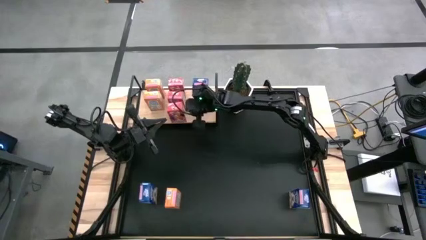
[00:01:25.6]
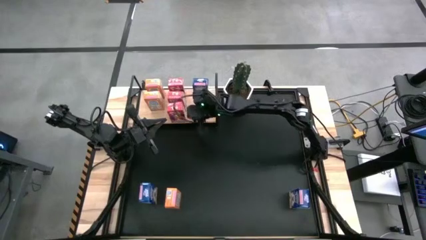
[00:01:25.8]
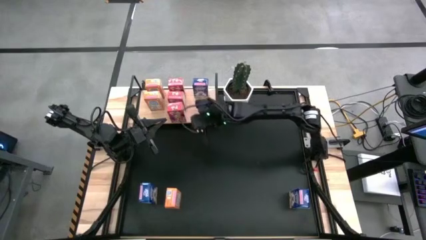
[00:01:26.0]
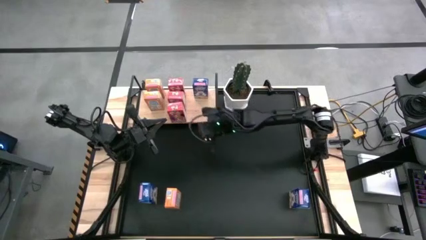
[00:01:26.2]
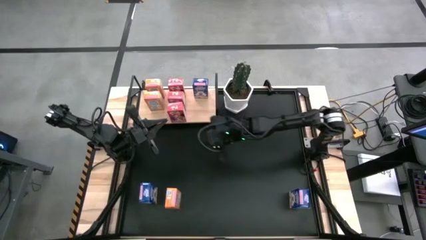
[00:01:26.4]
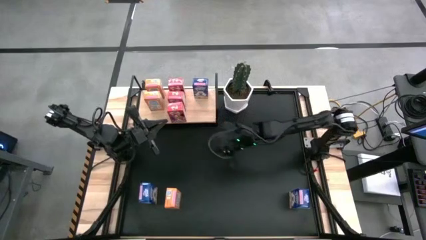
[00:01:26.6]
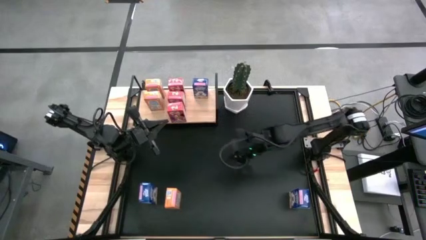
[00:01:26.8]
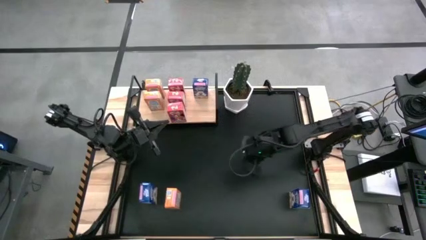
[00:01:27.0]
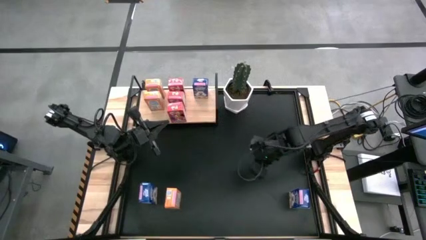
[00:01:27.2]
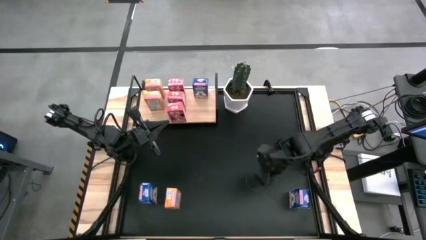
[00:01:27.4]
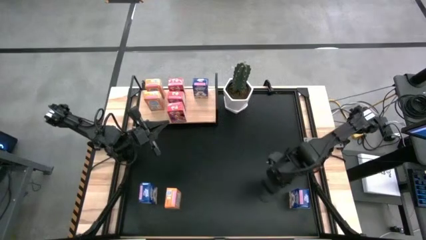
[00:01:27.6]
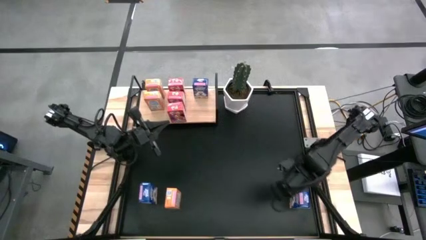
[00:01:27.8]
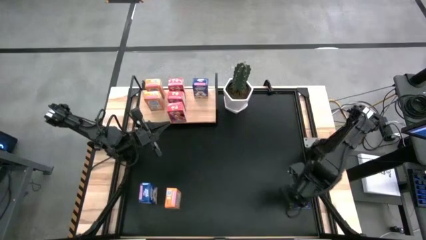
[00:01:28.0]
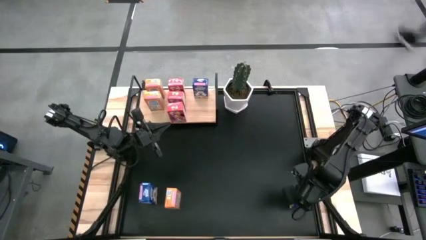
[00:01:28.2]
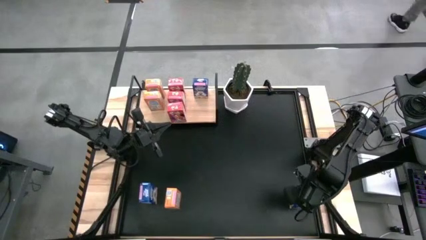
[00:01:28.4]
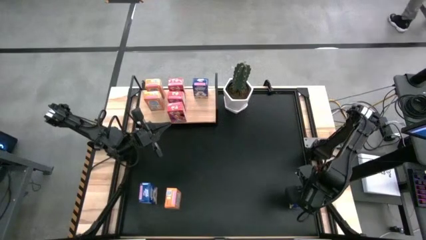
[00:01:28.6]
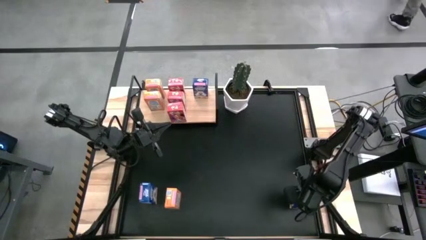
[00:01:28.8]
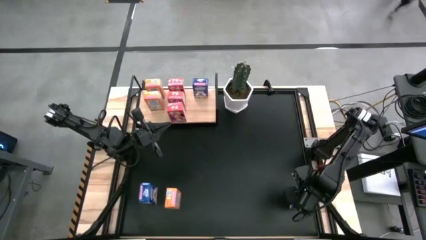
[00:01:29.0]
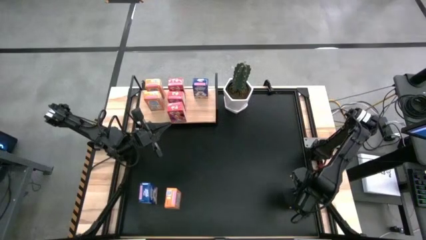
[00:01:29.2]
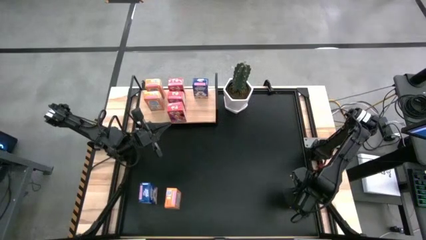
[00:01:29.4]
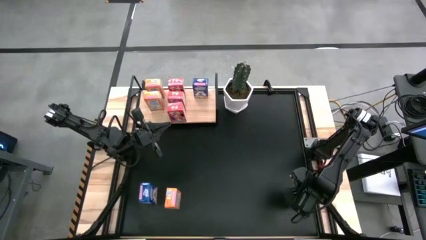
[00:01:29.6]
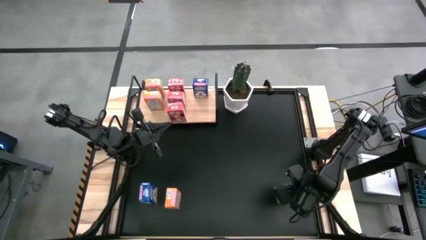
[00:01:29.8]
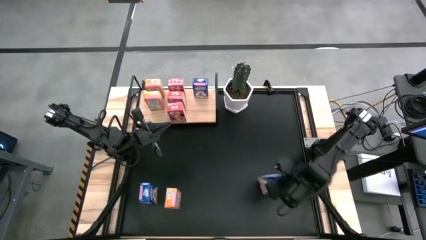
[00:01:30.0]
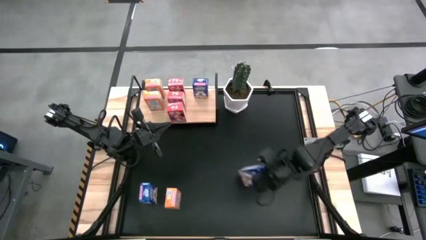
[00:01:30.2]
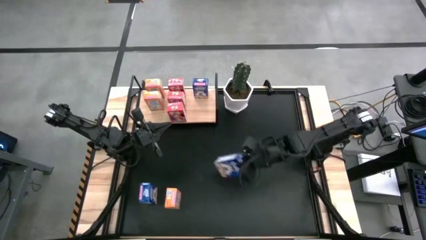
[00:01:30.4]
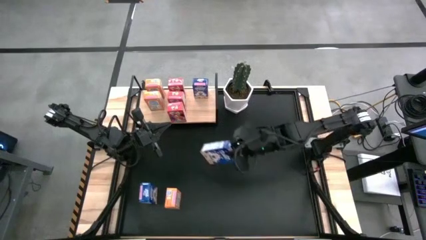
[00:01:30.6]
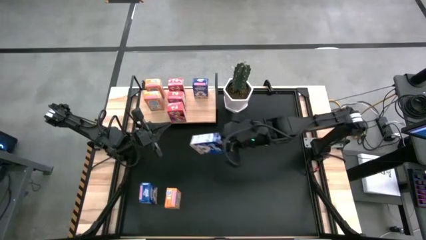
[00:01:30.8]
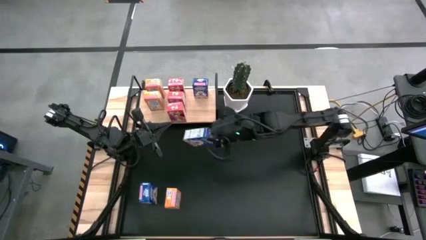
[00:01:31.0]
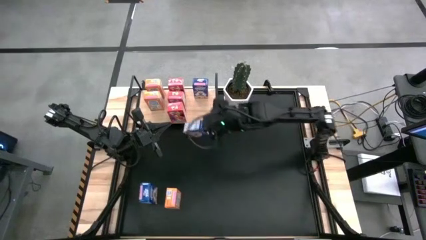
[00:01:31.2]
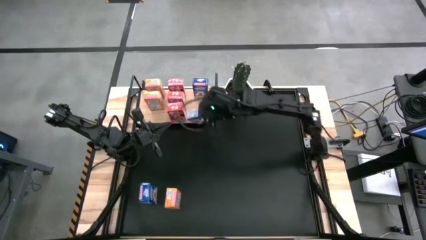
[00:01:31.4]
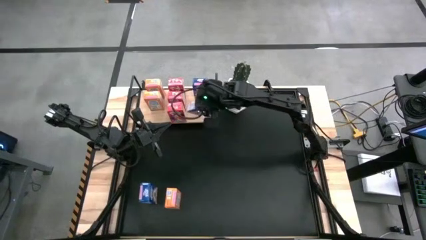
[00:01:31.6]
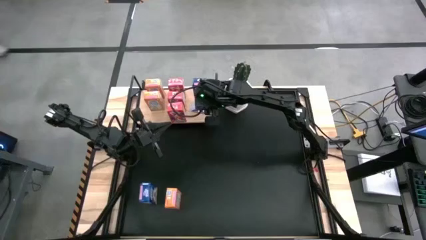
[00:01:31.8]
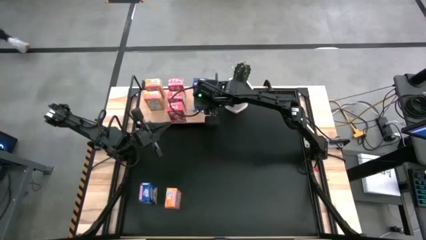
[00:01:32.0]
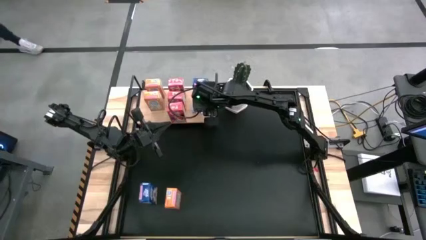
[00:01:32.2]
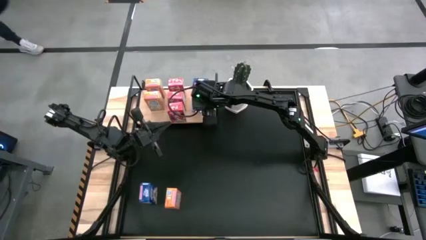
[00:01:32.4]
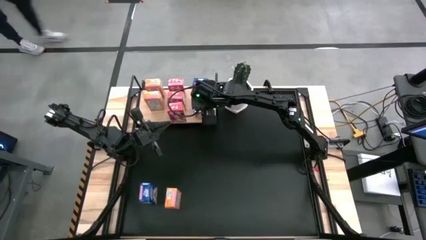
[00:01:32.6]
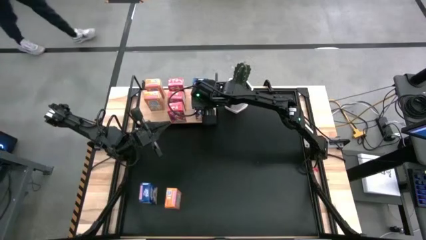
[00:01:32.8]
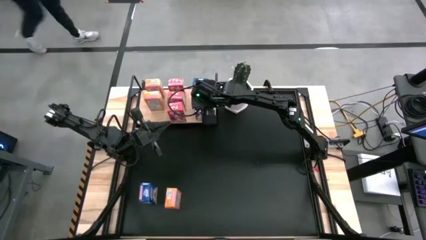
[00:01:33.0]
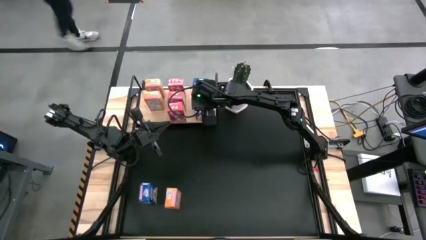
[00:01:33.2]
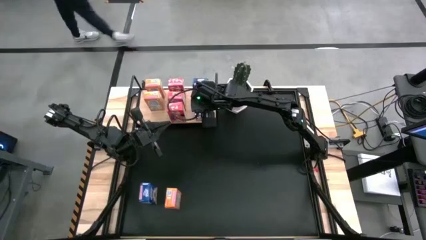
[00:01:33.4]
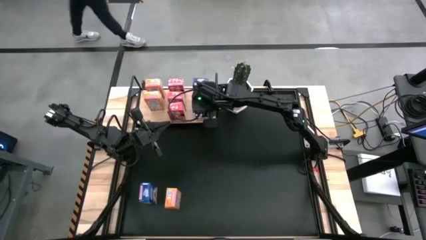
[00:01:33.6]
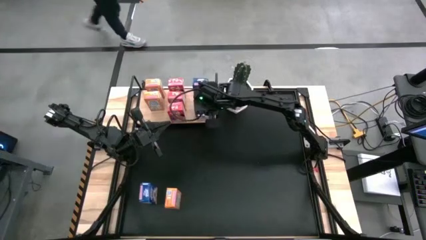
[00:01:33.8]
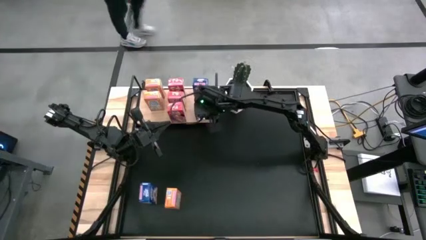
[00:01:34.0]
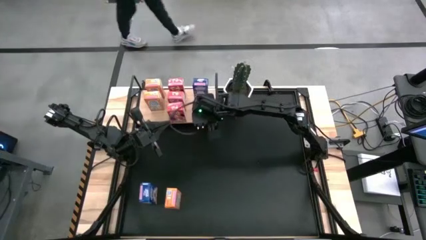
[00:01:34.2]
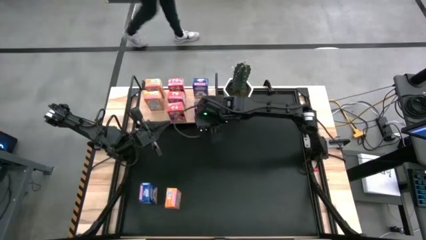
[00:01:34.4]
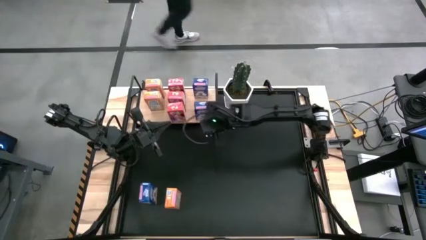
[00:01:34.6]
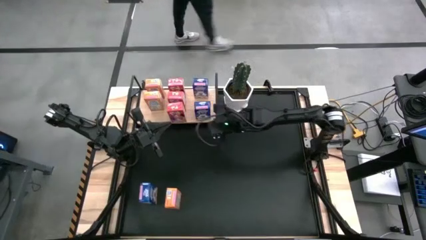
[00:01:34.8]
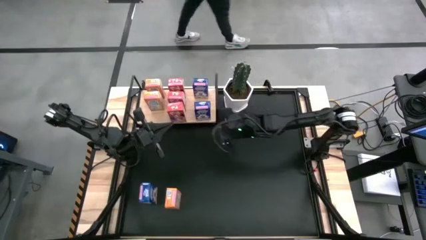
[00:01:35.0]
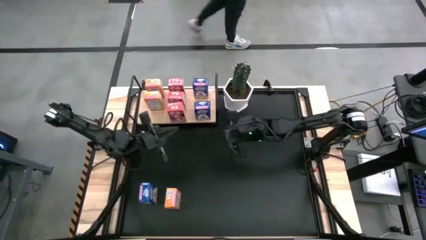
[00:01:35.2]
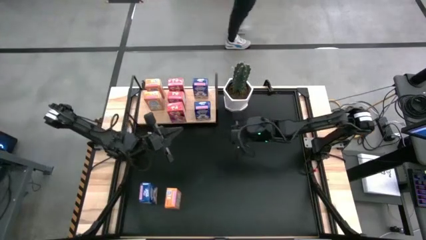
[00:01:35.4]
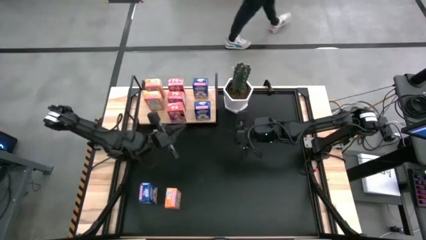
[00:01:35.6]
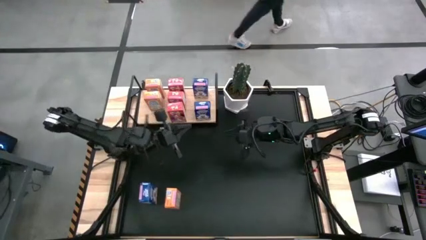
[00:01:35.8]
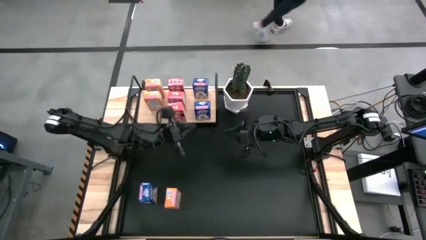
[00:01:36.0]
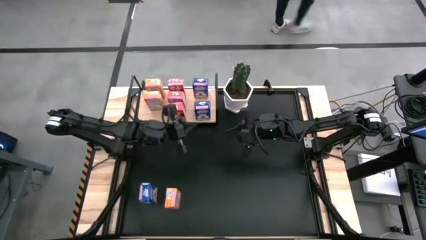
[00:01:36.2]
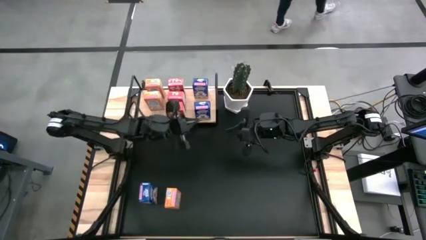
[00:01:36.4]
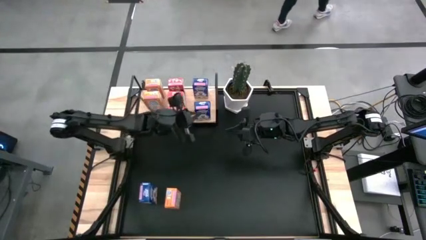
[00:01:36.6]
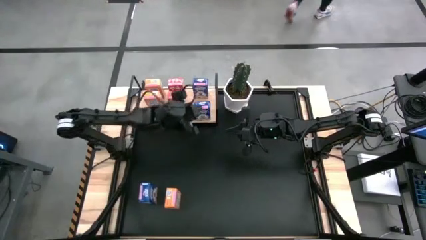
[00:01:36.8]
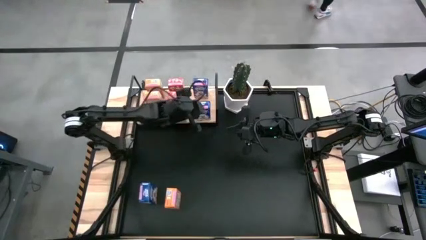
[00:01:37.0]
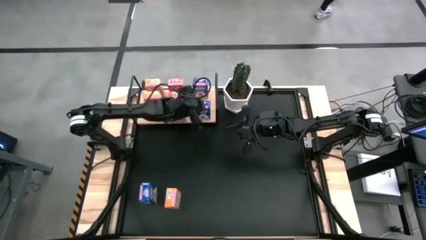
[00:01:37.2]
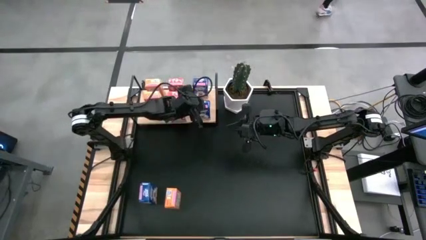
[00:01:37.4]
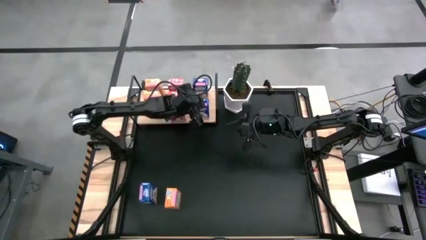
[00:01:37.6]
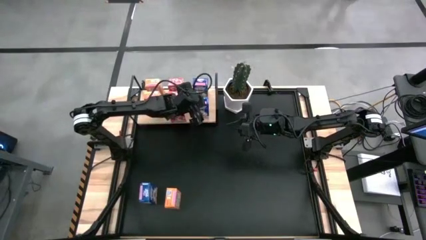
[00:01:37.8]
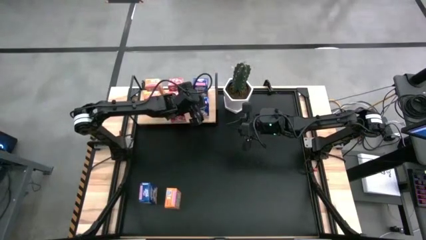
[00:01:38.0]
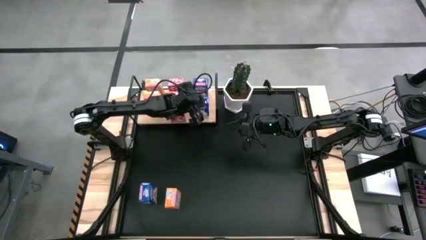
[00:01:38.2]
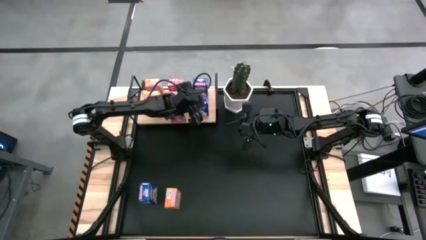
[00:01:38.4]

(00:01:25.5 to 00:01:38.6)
Task: Stack cereal on shelf
Put the right blue cereal box on the shelf and align it with the other blue cereal box

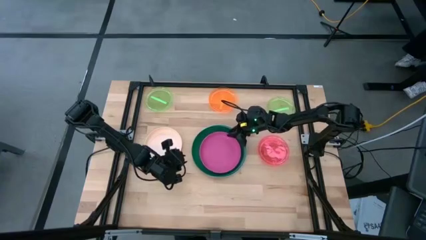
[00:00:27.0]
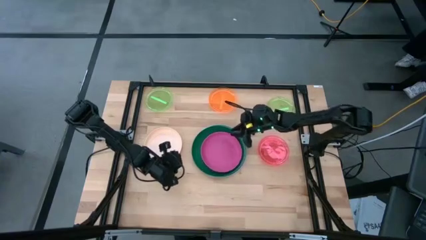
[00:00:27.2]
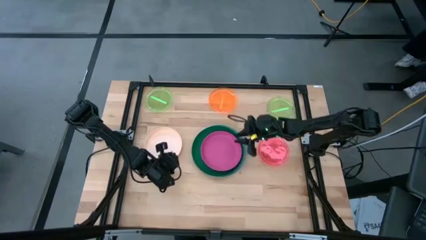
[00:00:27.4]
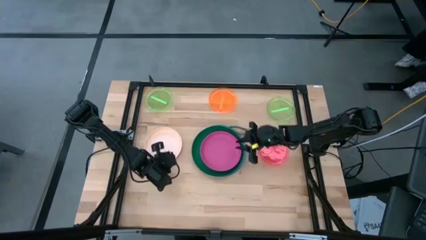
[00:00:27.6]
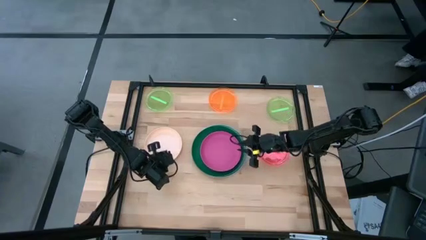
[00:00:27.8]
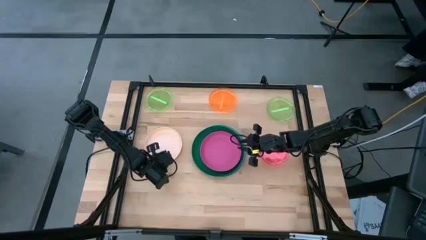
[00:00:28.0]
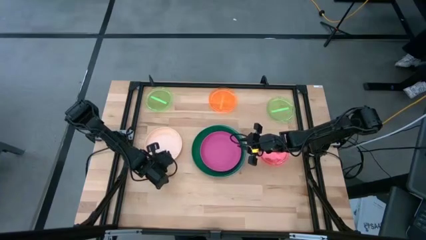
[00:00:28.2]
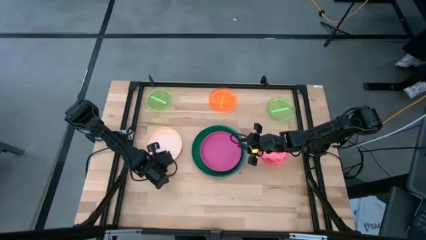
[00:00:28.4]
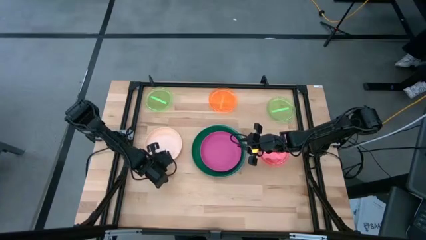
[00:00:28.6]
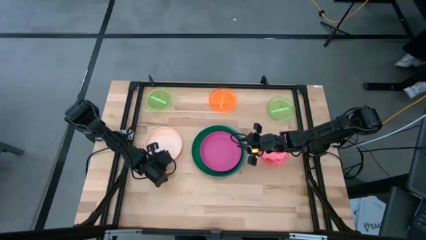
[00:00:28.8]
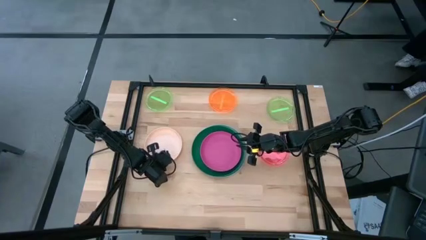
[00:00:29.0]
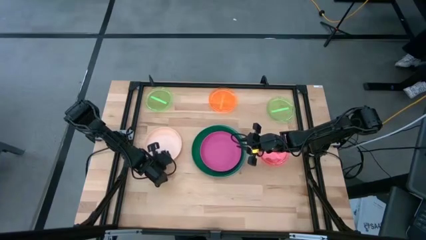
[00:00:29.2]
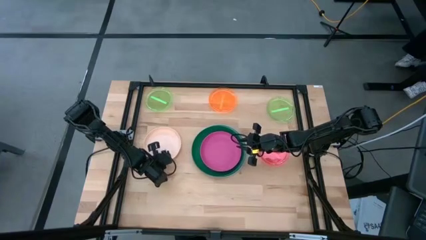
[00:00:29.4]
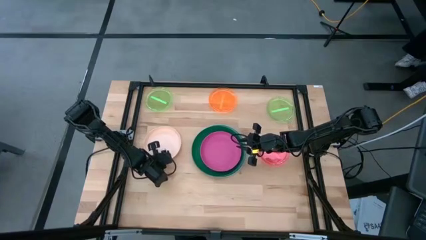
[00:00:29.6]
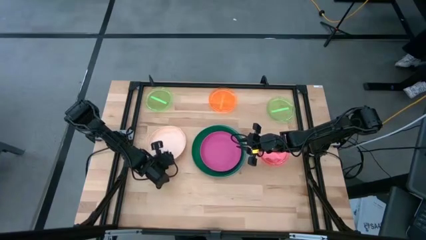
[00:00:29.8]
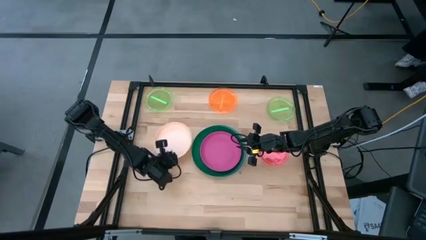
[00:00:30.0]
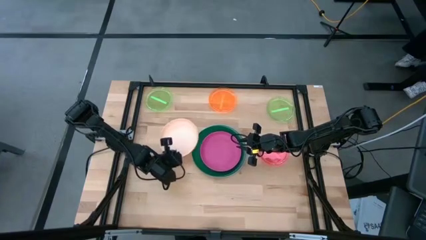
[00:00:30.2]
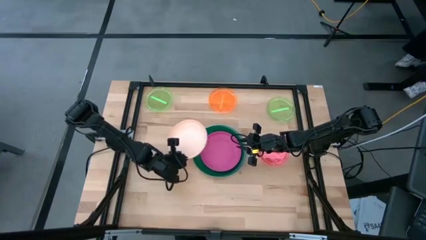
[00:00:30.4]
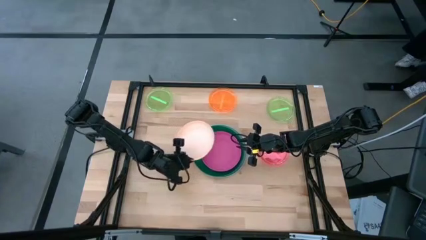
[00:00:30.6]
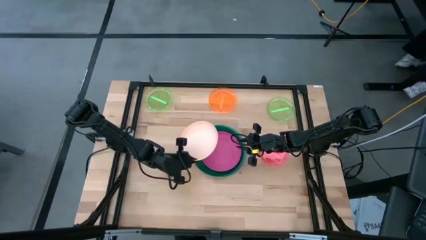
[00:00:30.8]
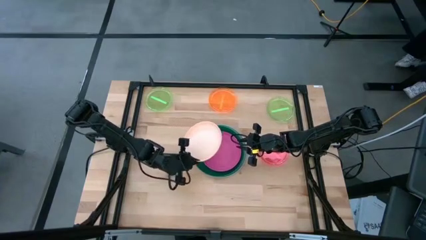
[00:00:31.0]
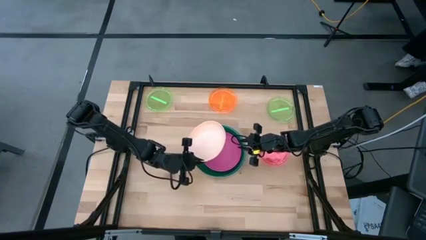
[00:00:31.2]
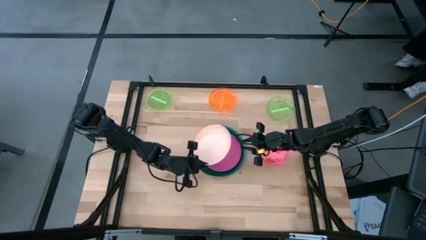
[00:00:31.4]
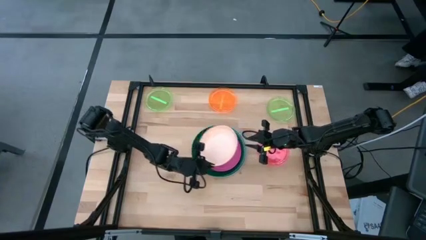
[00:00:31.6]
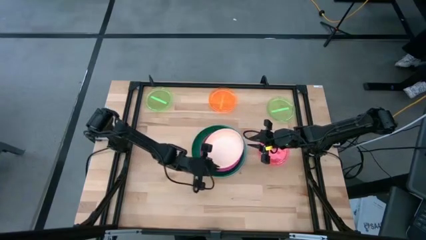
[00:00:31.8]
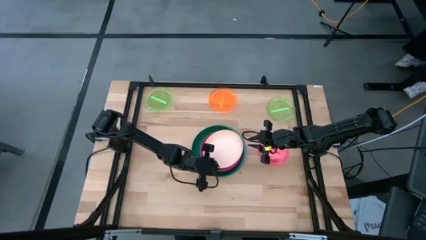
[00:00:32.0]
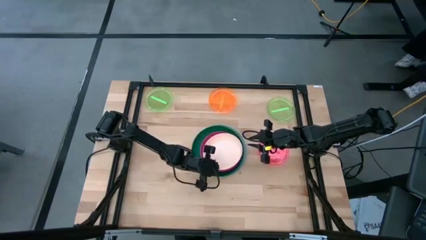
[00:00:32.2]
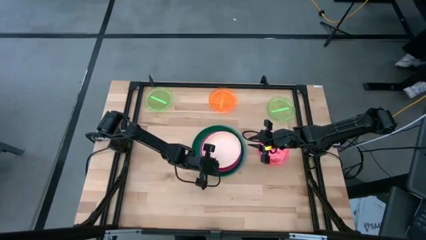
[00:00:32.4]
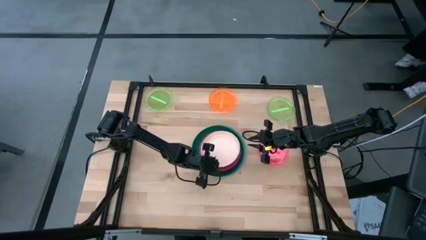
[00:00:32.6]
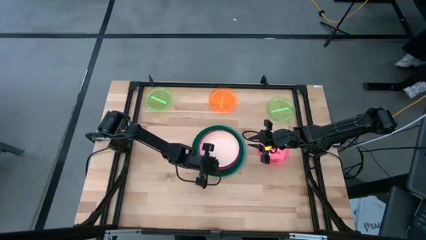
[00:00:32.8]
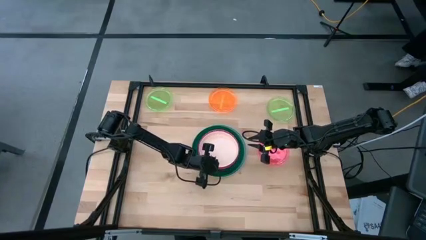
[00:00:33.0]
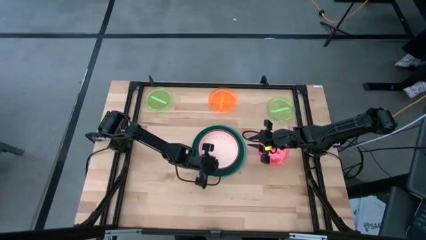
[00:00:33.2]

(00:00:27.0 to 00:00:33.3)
Task: Stack plastic plates
Stack the light pink plate on top of the pink plate
